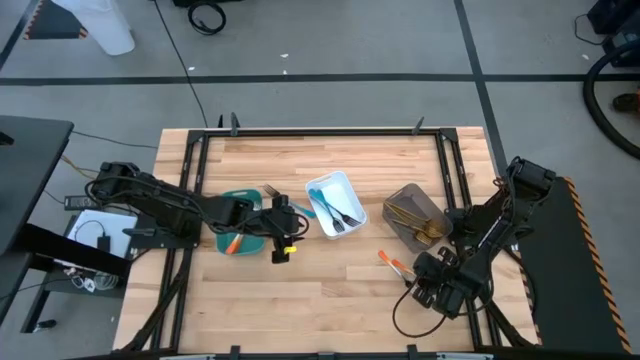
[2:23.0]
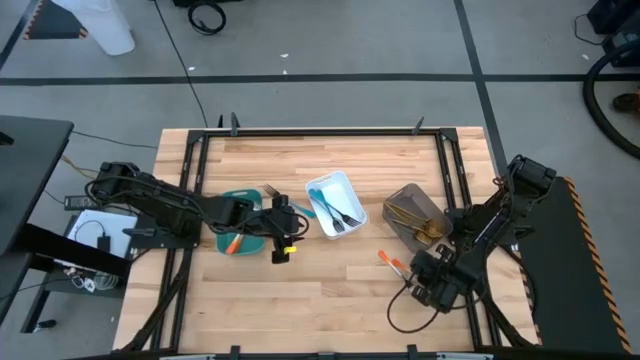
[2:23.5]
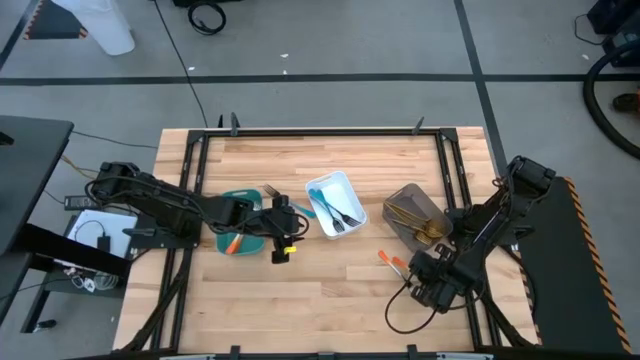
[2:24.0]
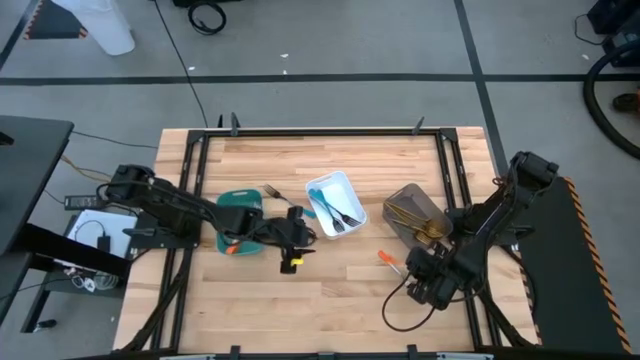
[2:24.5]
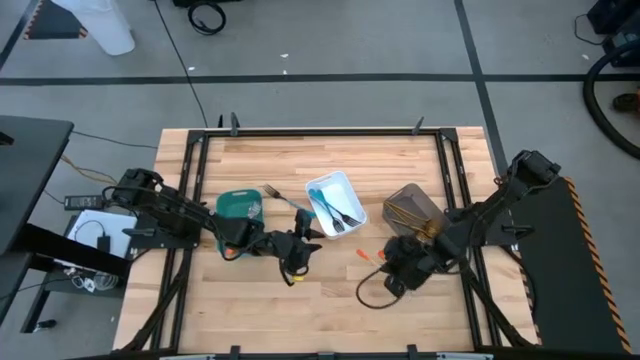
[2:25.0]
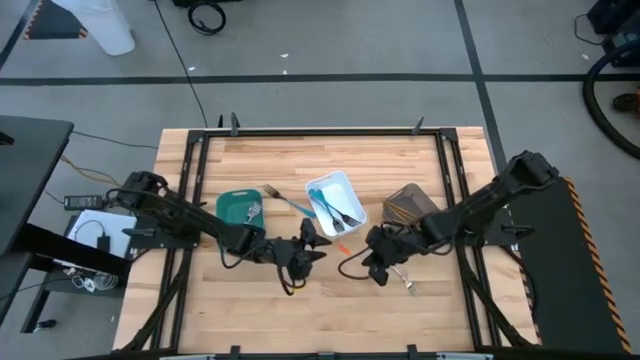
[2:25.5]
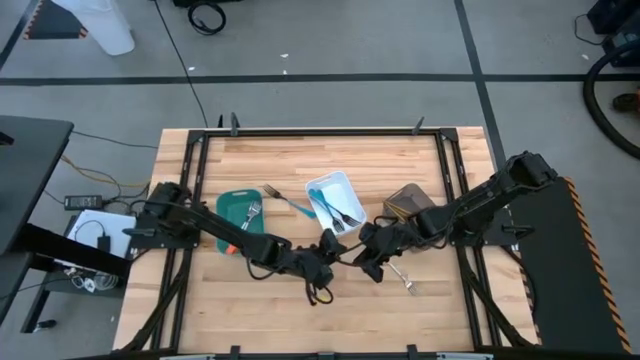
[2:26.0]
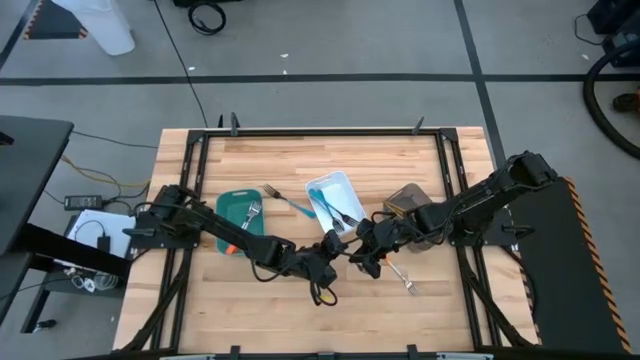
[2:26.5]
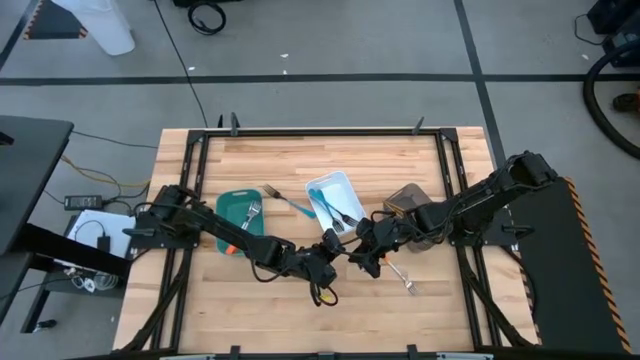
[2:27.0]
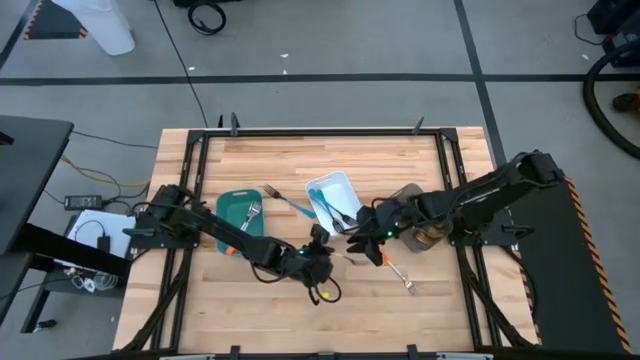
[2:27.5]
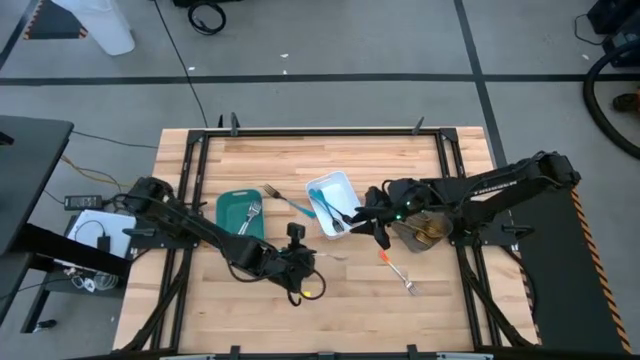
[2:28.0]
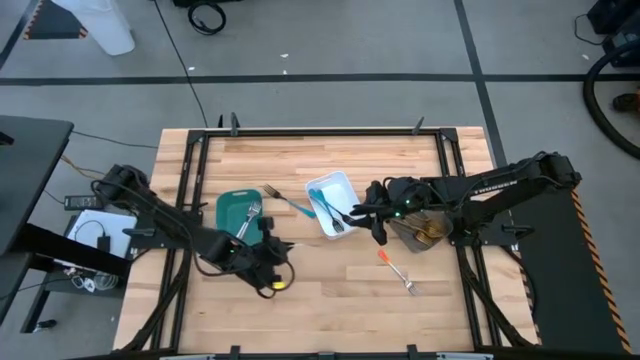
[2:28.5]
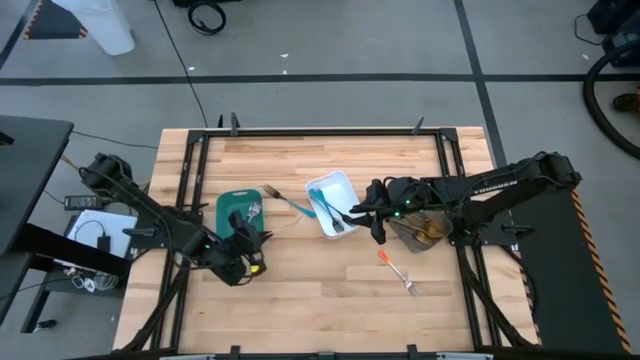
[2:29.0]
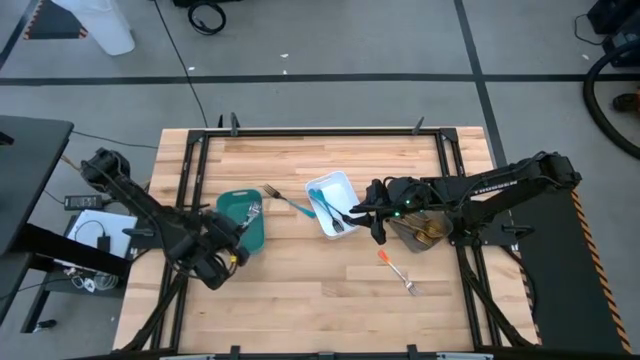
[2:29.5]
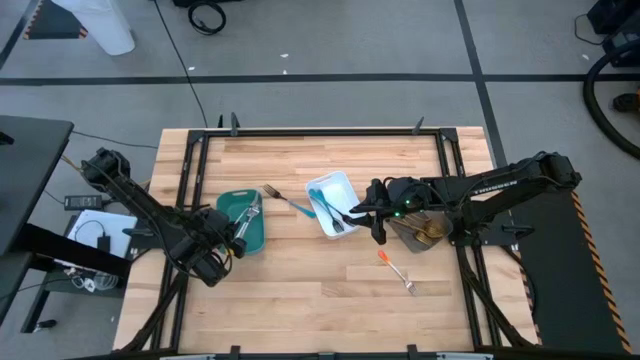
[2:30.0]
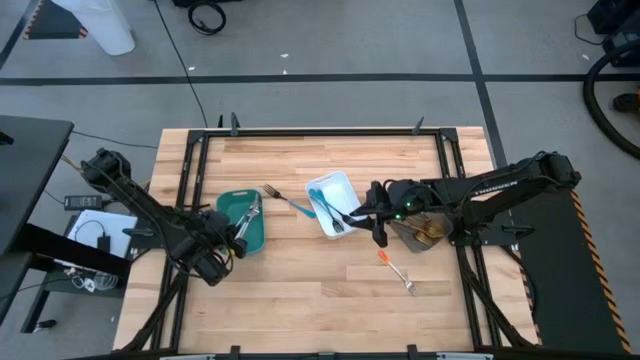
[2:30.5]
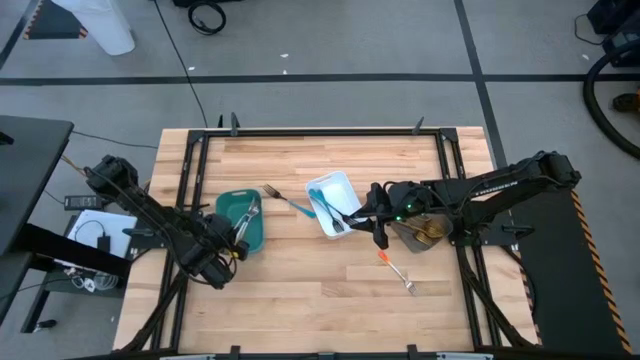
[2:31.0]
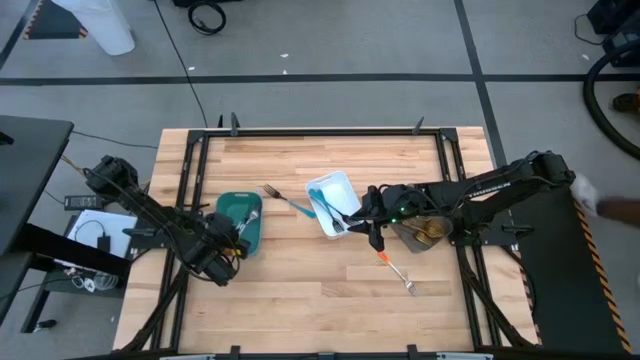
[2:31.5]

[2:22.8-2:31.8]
Task: Sort silverware by color (type)
Put the orange fork into the green bin

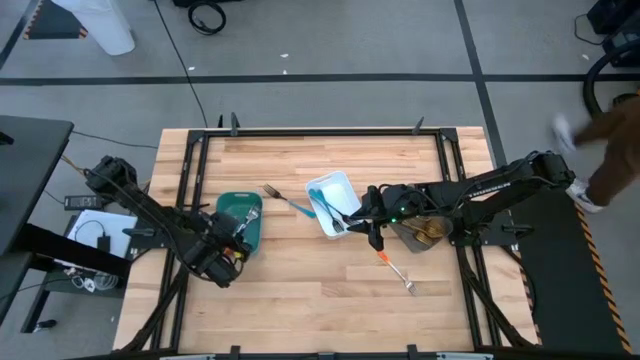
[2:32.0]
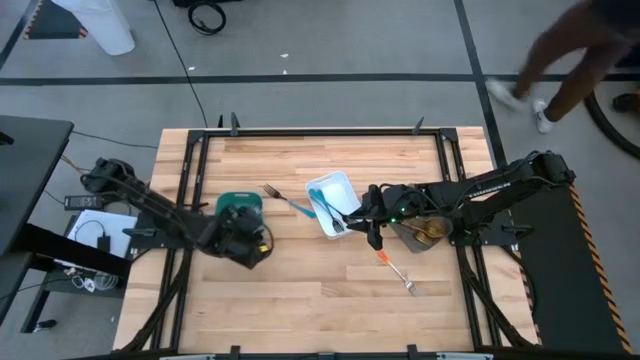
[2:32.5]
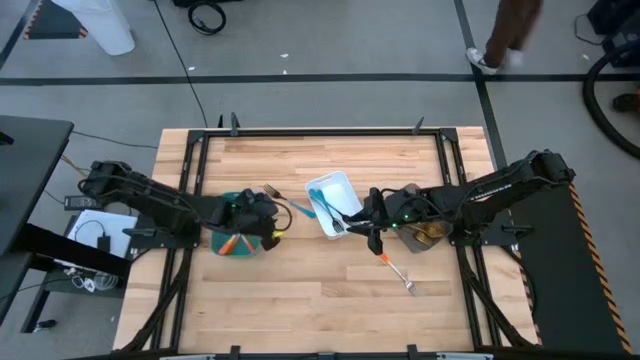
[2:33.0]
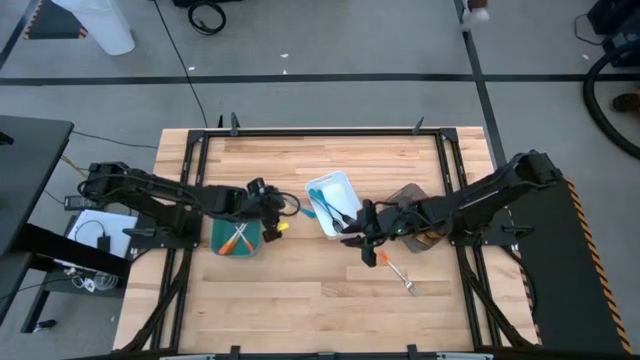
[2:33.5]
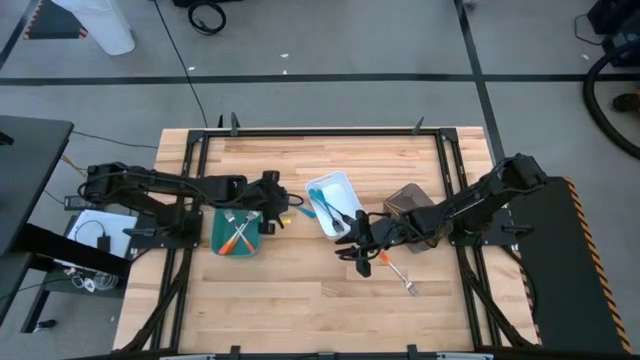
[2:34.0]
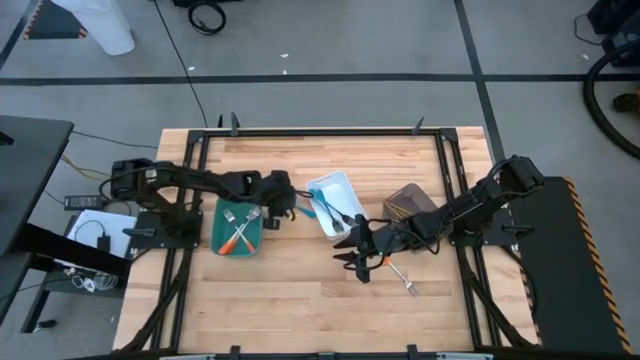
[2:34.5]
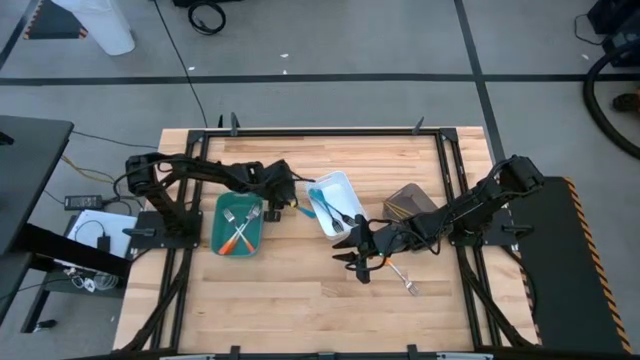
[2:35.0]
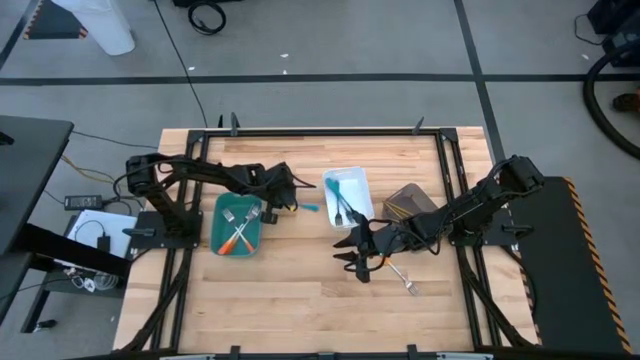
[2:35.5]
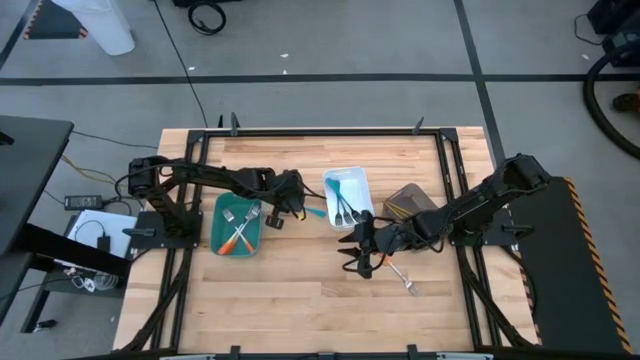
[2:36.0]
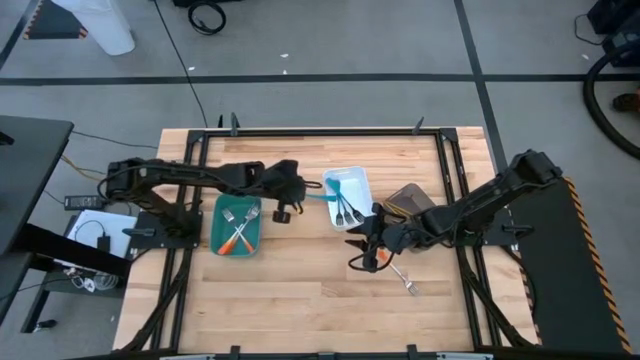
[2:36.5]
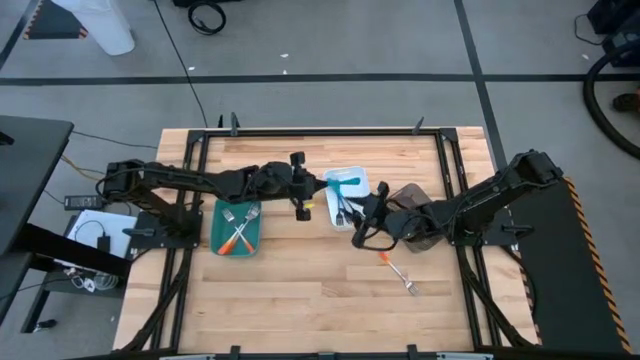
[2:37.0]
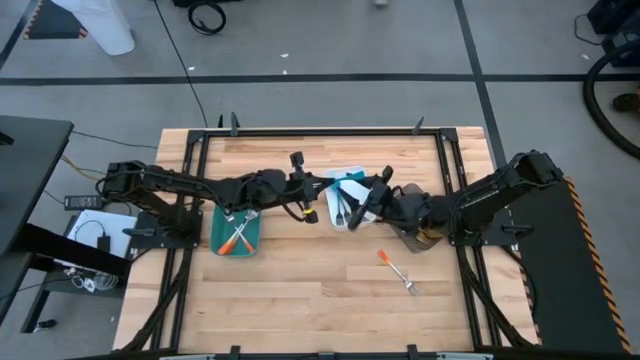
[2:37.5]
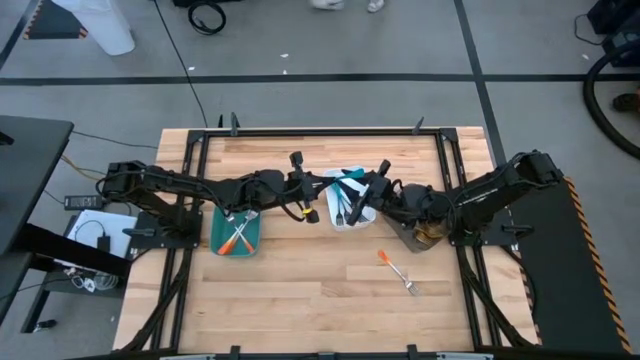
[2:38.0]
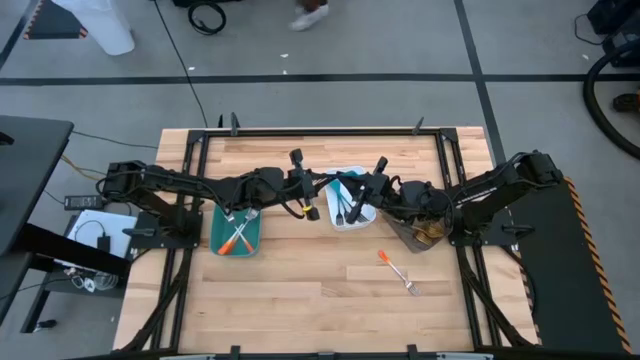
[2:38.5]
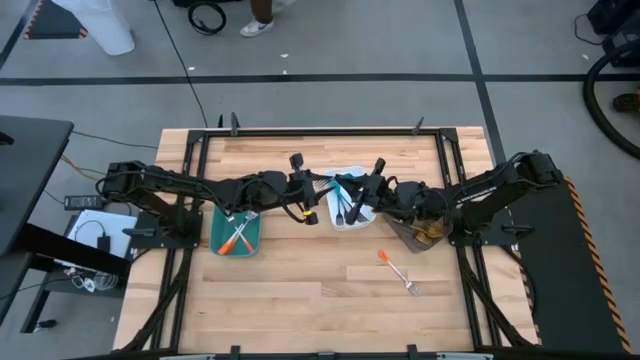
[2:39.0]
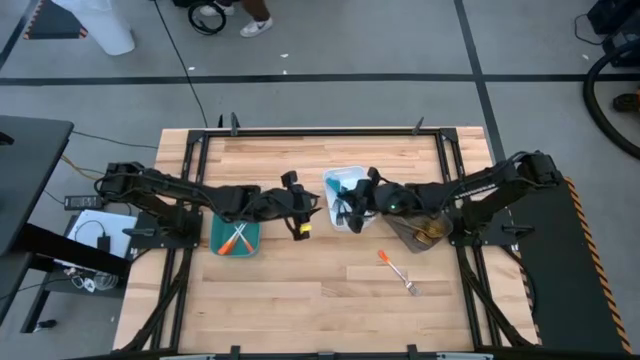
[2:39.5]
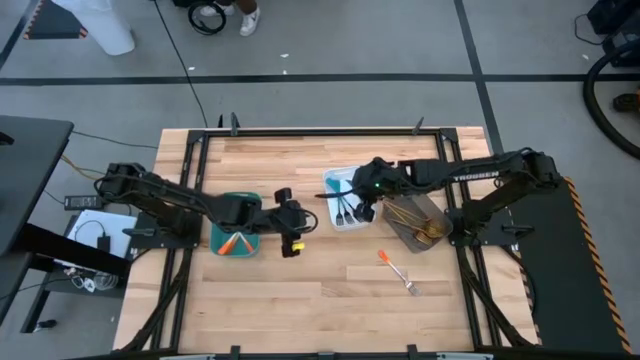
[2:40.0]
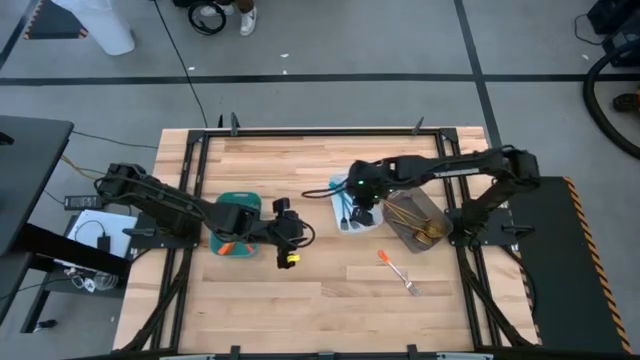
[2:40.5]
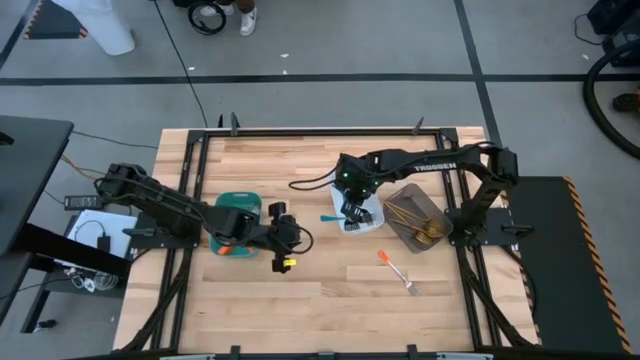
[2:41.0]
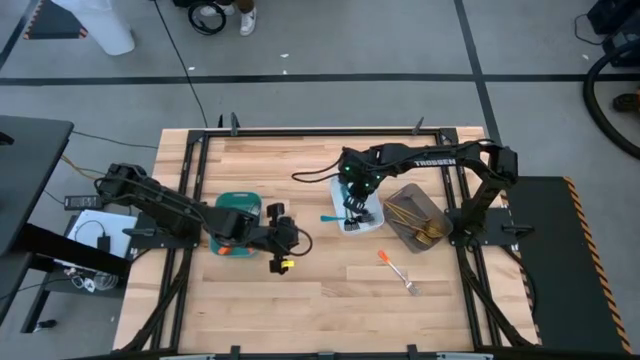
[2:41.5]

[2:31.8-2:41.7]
Put the blue fork into the white bin

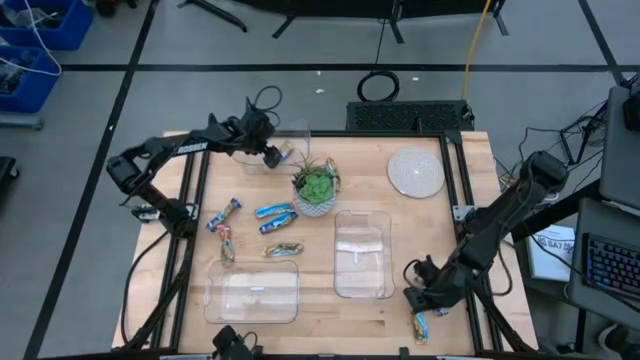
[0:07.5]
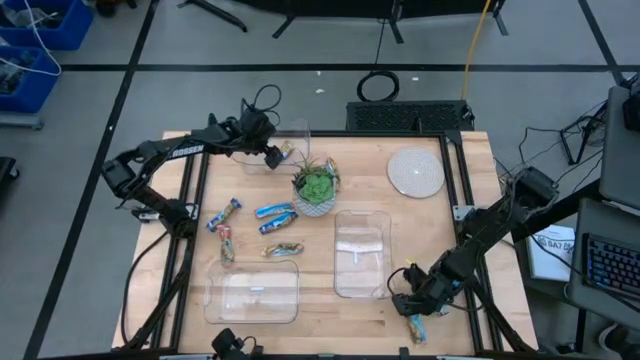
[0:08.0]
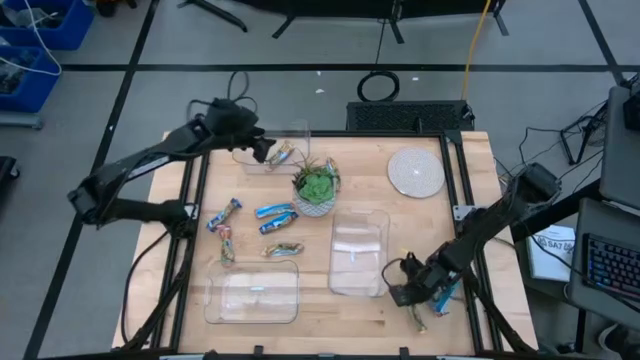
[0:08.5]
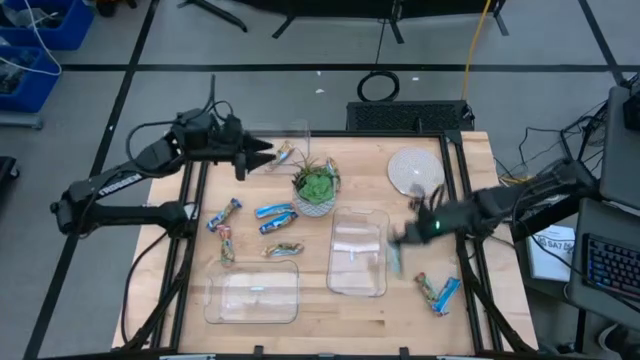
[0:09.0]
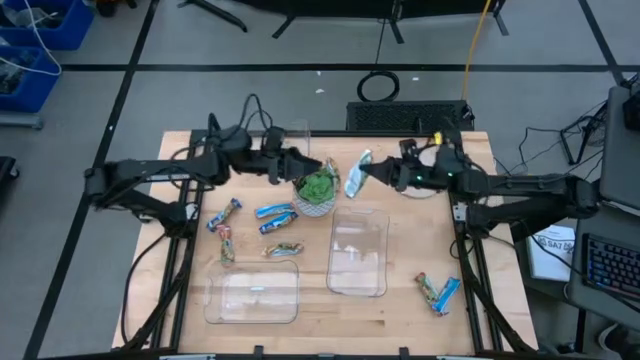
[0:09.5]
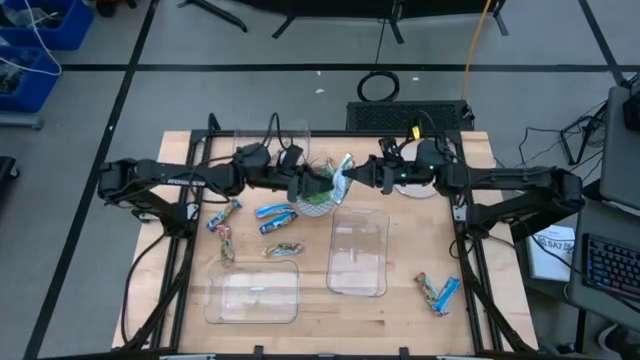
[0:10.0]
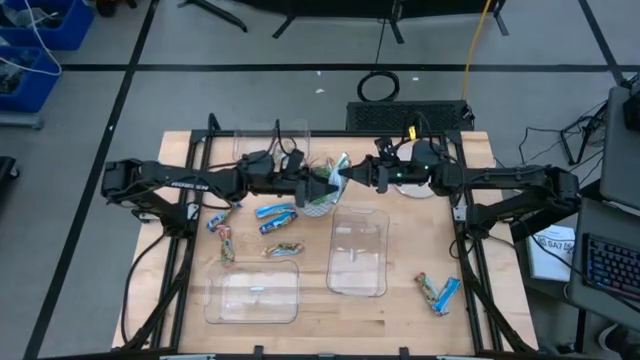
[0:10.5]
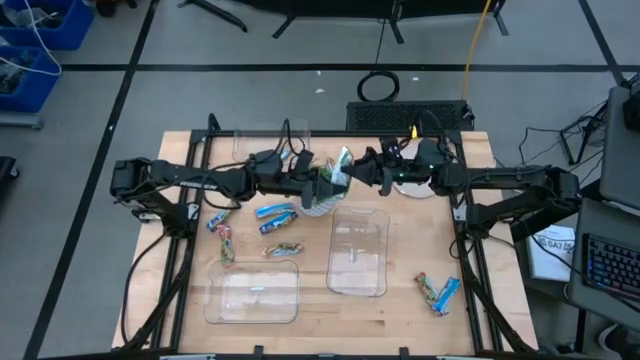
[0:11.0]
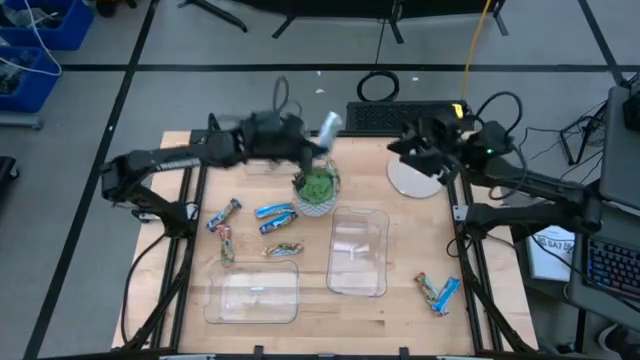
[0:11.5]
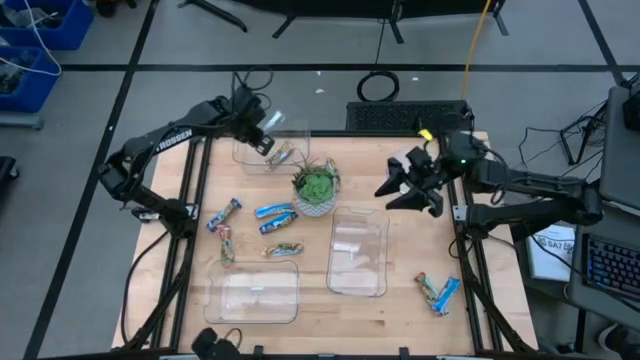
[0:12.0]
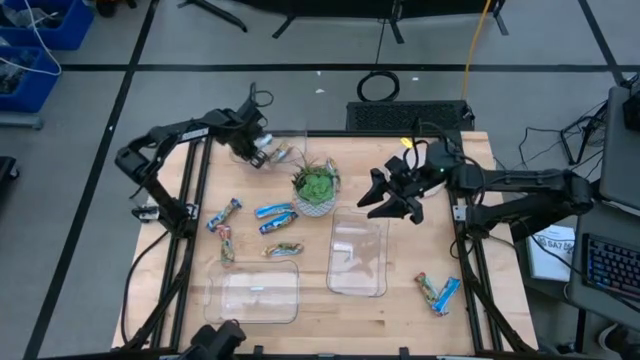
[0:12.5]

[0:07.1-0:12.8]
Task: Pick and place Granola Bars by type
Put the bottom yellow granola bar into the top transparent bin
